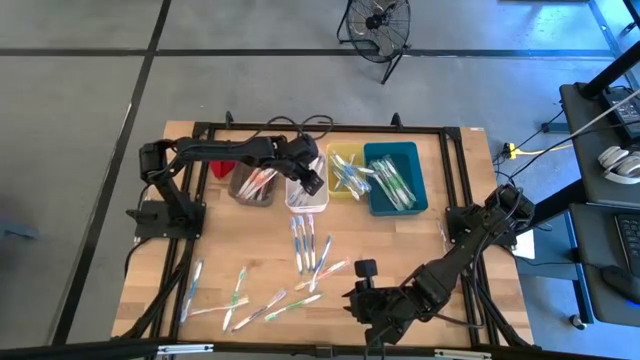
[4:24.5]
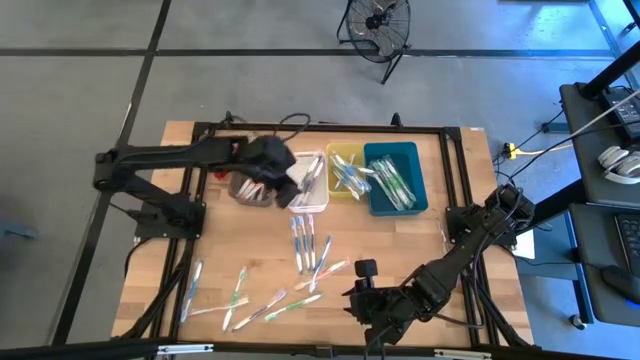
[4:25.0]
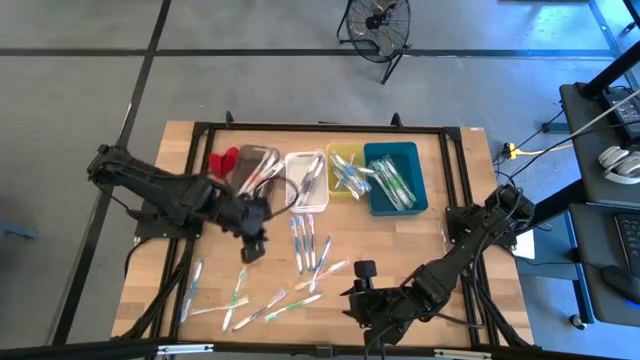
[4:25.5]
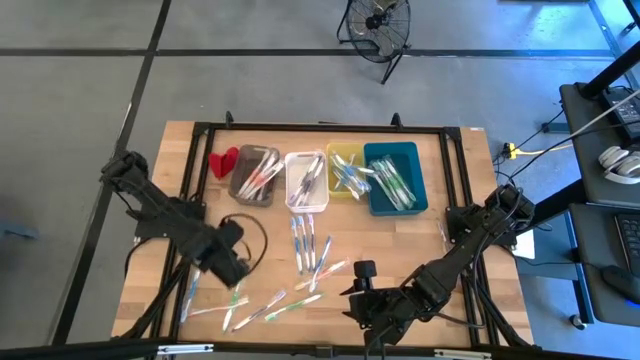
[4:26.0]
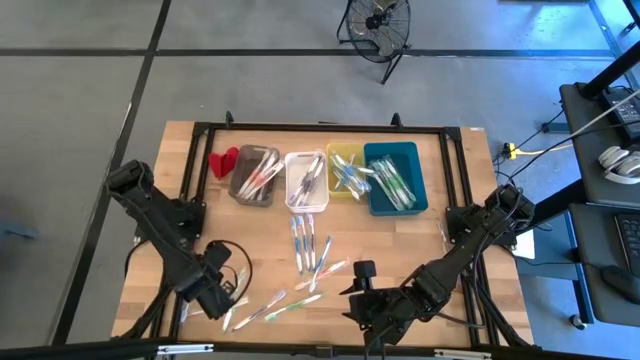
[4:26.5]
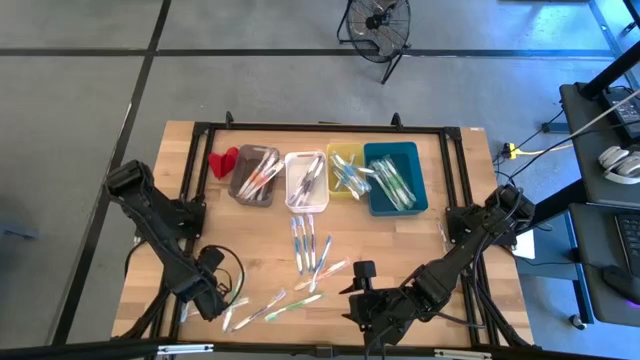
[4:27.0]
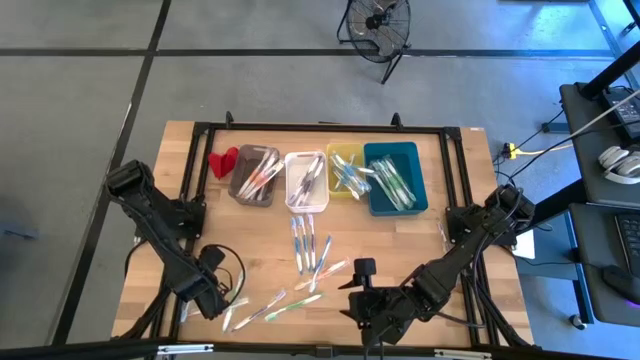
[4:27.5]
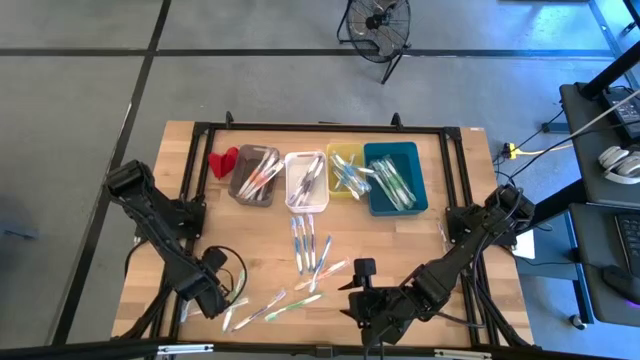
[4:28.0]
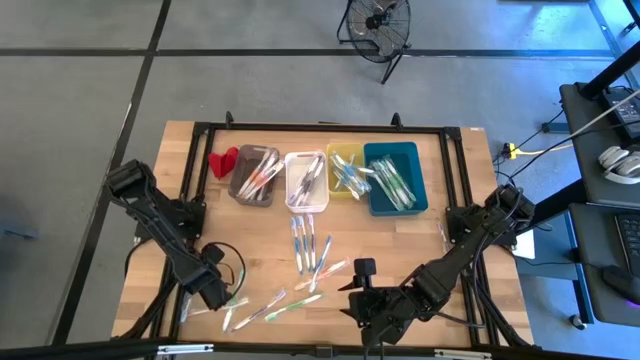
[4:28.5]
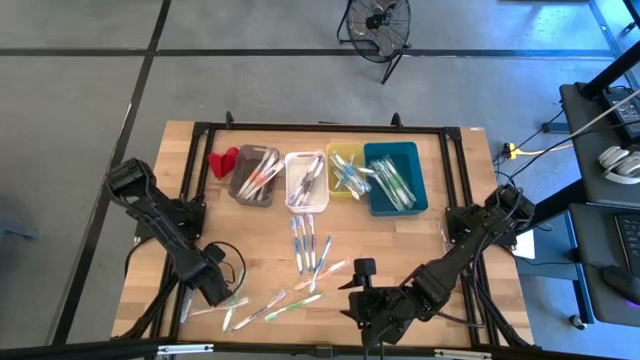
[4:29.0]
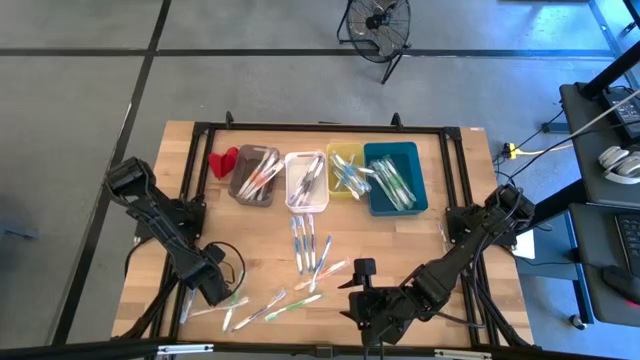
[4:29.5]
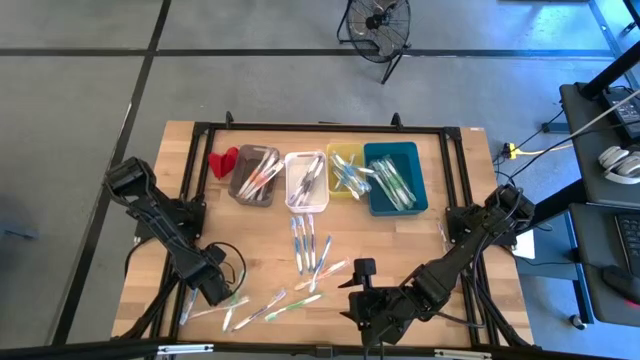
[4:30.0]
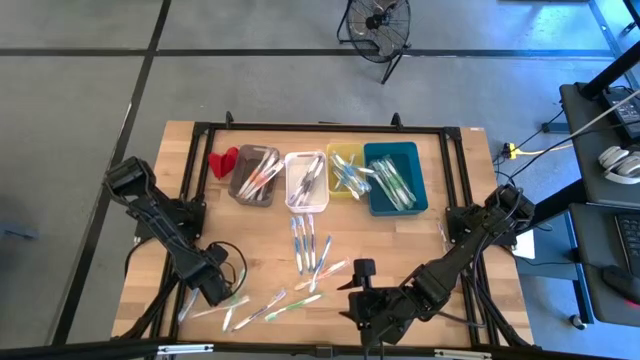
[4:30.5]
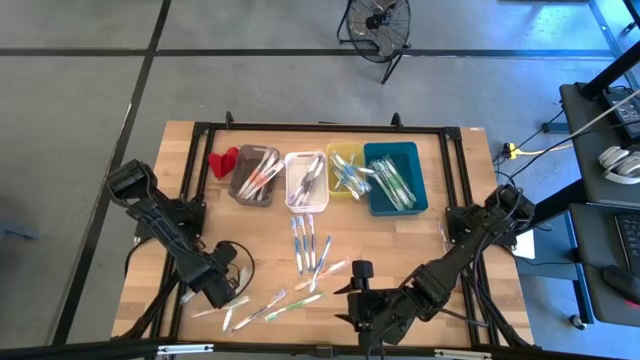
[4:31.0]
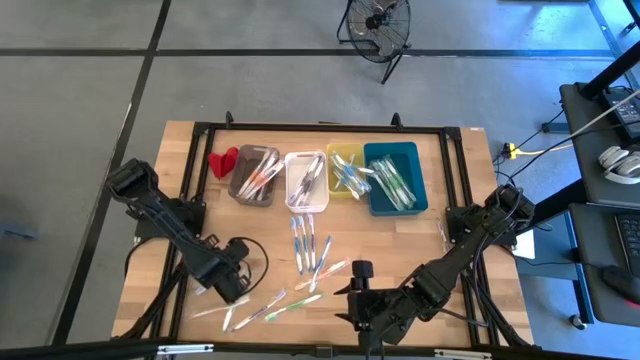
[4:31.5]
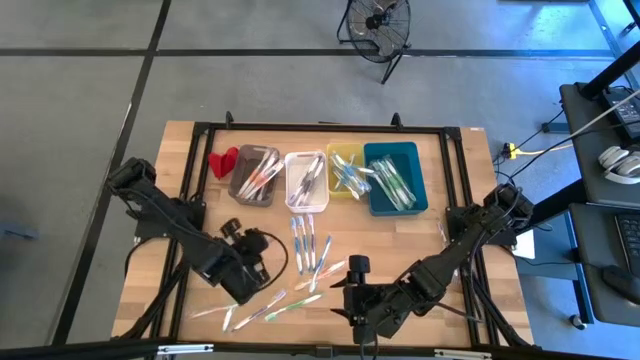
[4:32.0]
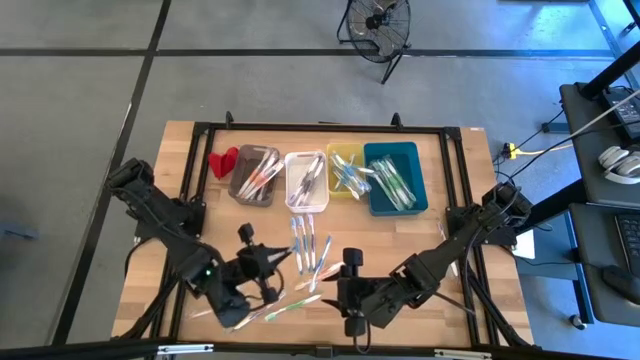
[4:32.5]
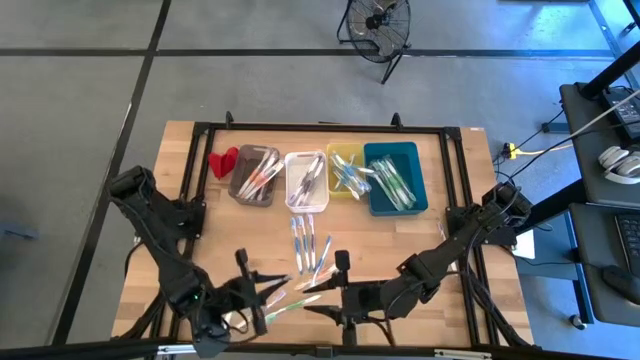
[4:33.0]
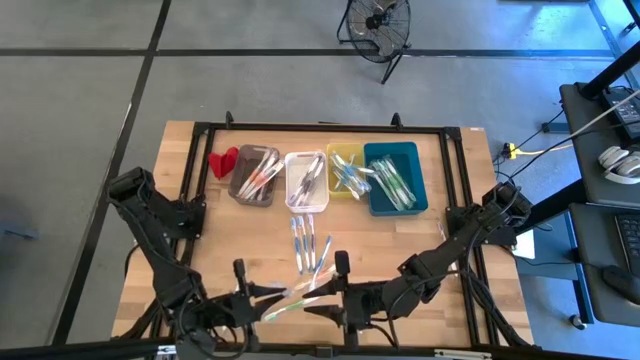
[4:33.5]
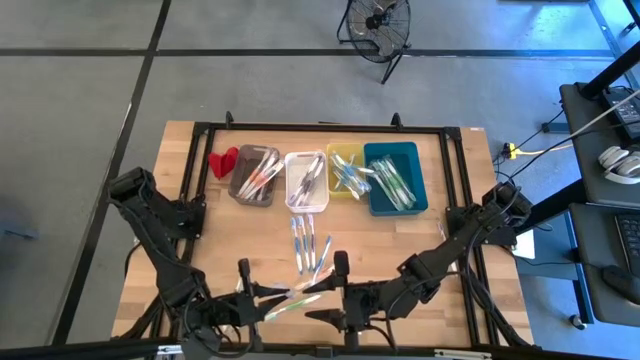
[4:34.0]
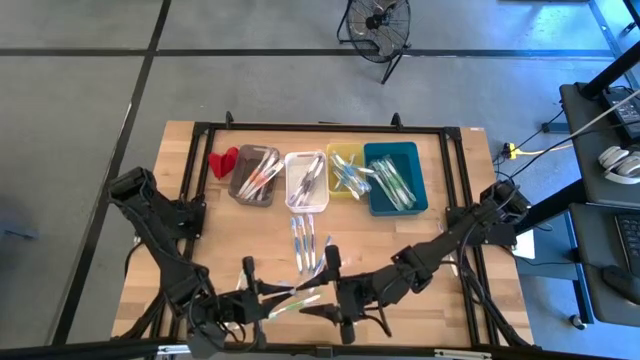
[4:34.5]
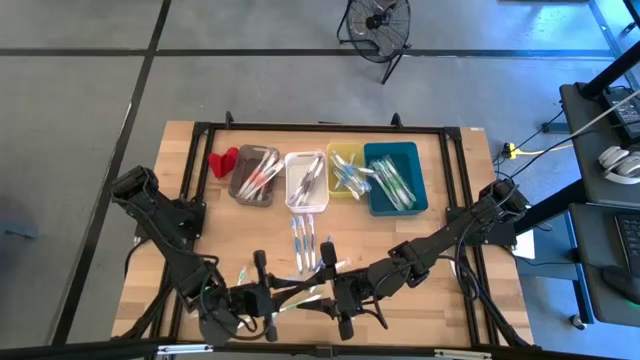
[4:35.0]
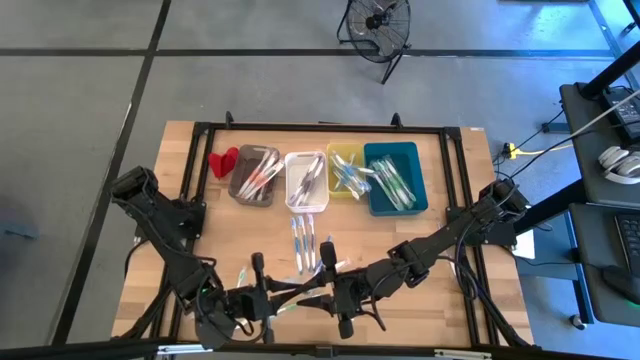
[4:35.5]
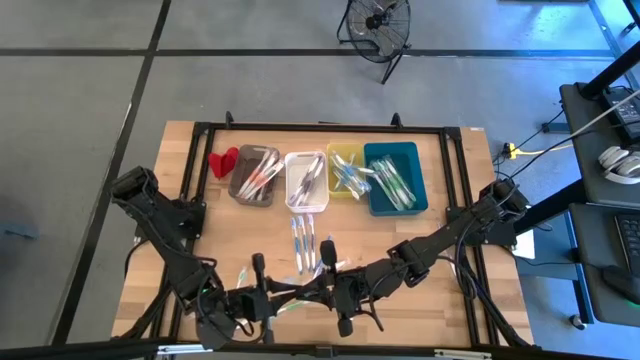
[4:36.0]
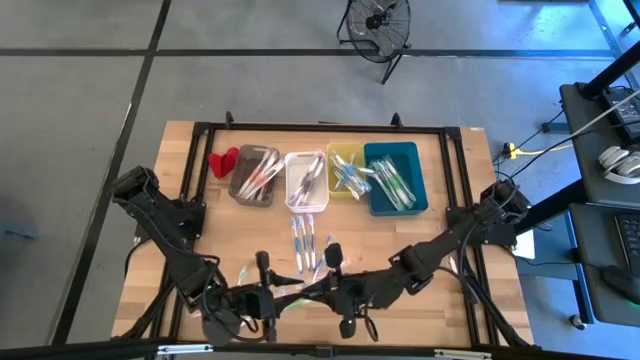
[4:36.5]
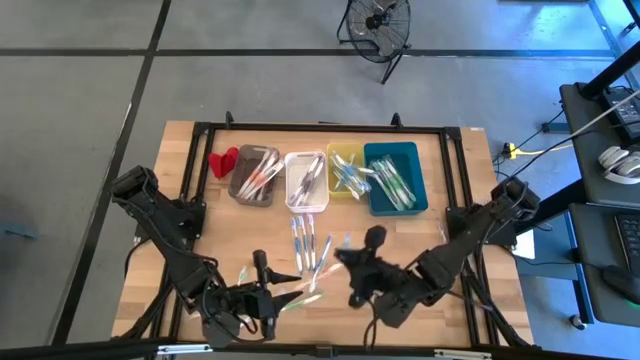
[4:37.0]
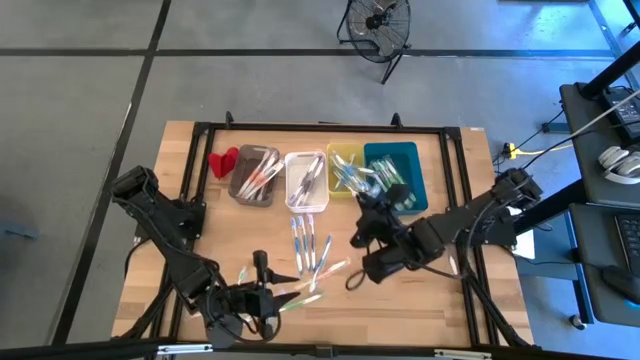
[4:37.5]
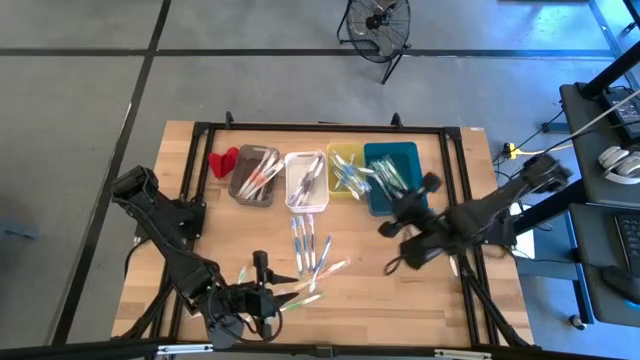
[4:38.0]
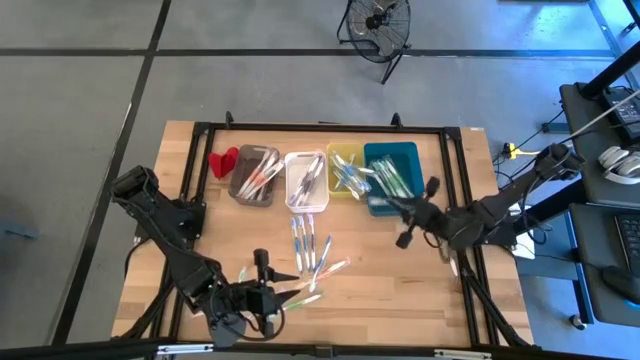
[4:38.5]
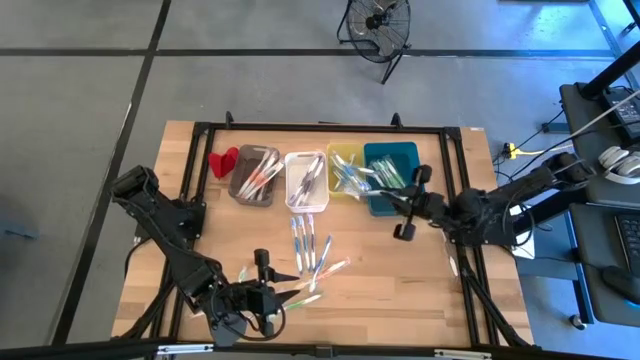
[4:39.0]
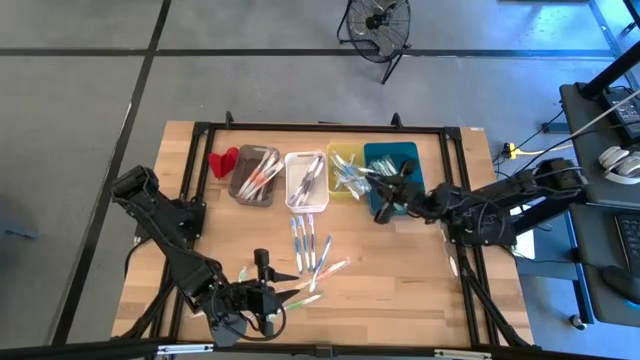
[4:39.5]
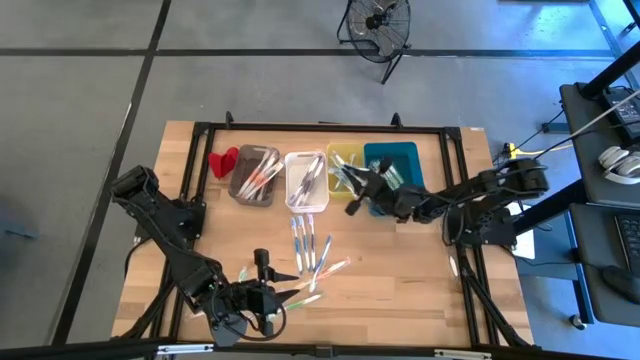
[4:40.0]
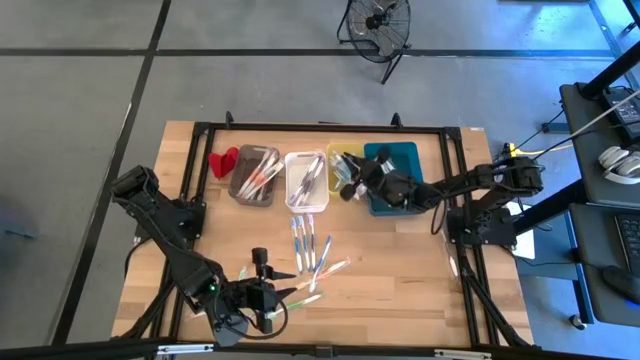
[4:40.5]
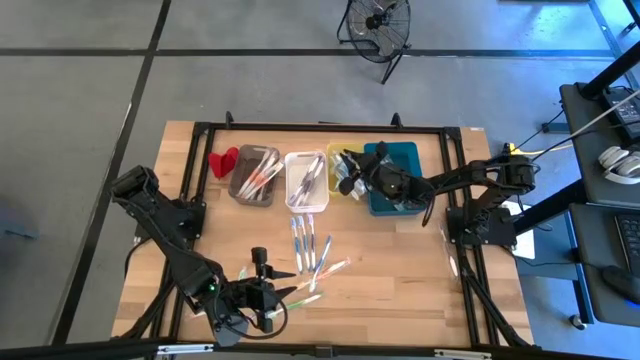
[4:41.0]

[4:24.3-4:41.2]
Task: Pick & Place Toothbrushes
Put the blue toothbrush into the yellow bin

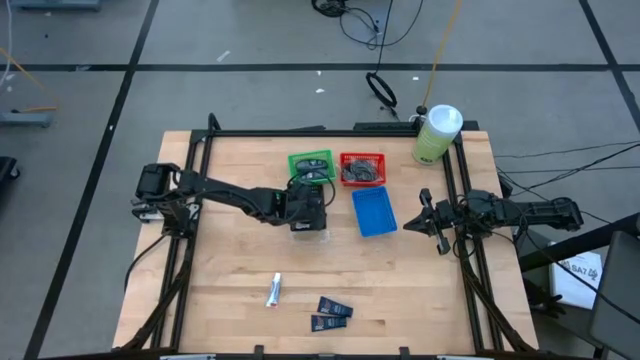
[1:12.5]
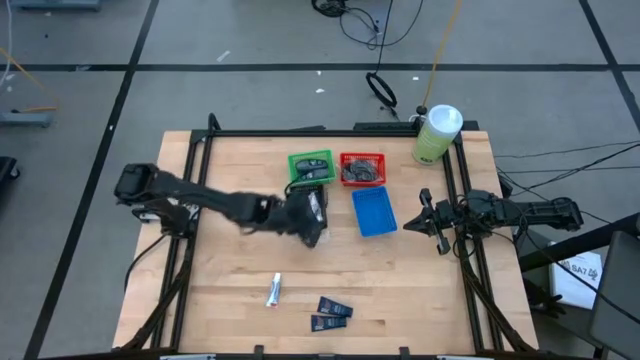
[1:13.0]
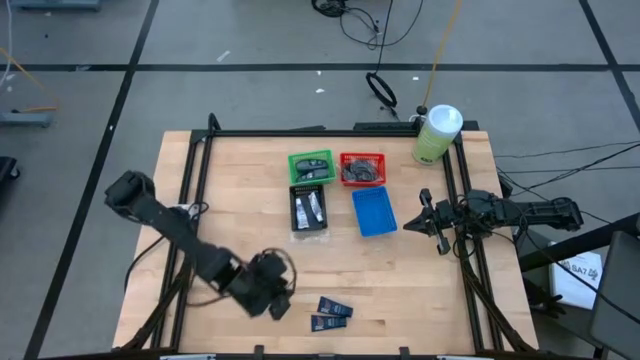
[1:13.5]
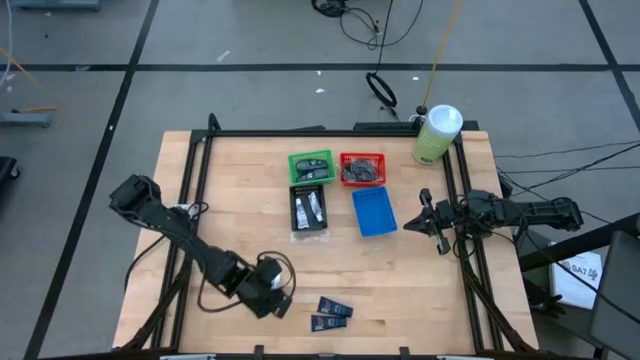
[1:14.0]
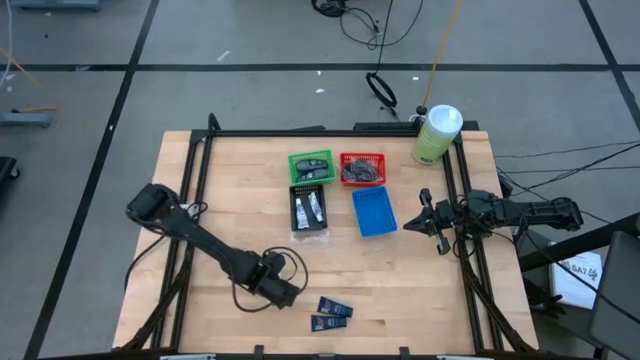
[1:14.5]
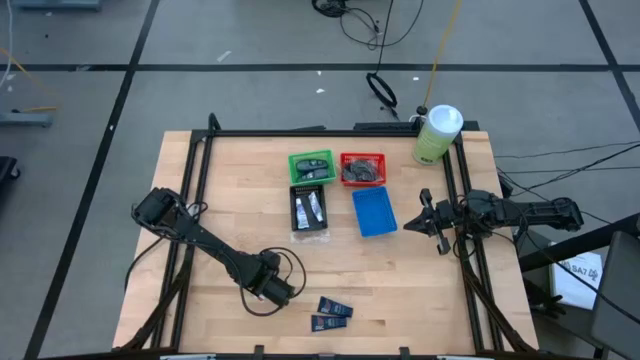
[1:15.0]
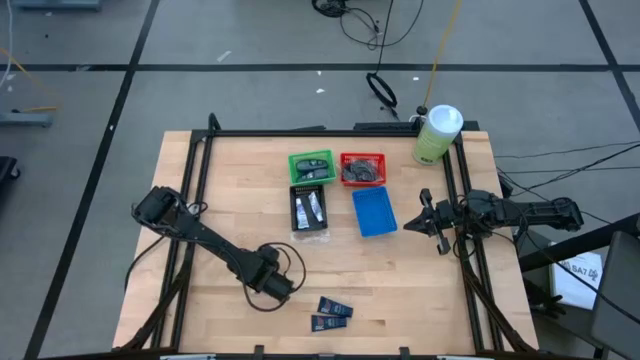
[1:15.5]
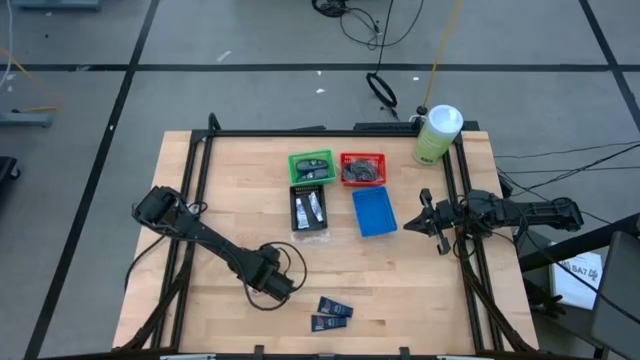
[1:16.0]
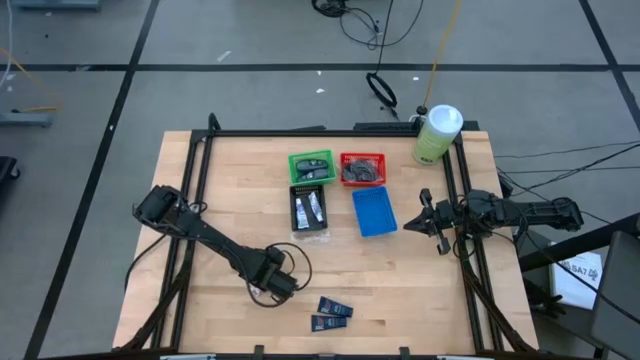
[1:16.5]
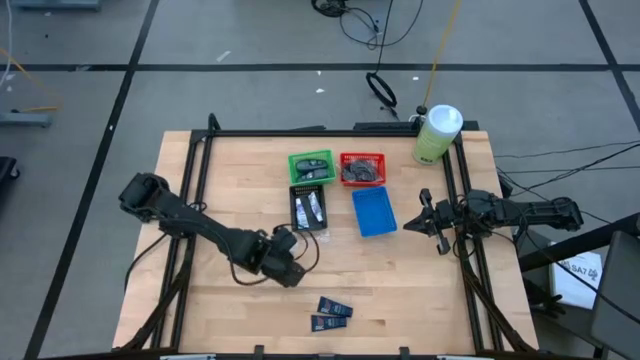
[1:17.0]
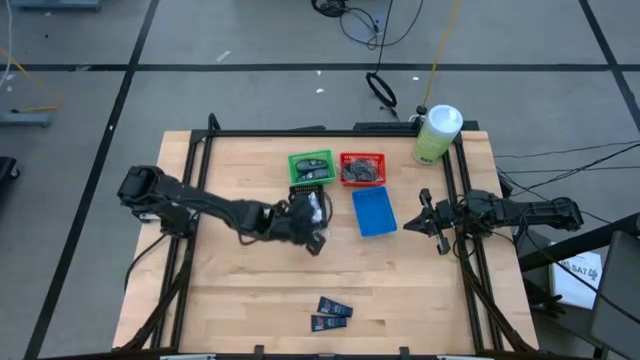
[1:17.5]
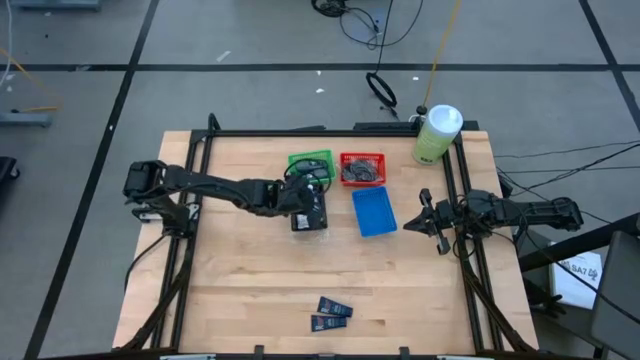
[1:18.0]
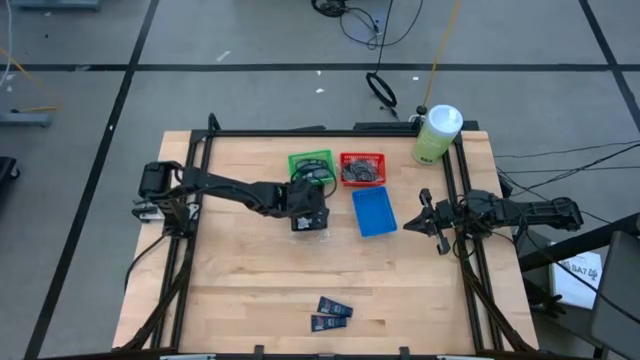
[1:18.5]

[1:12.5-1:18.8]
Task: Pick & Place Travel size toiletries
Put the white toothpaste into the black bin
